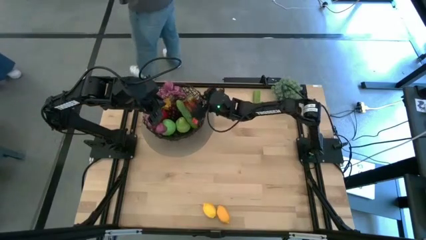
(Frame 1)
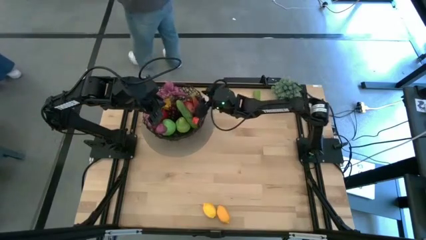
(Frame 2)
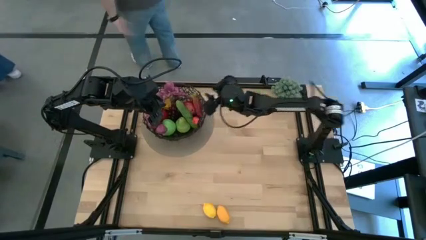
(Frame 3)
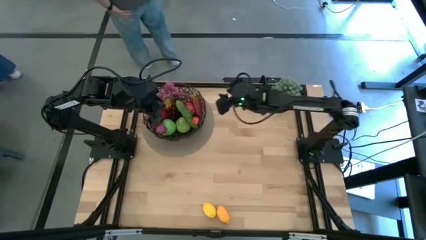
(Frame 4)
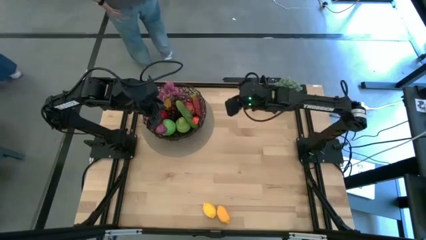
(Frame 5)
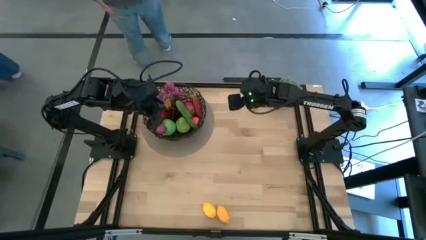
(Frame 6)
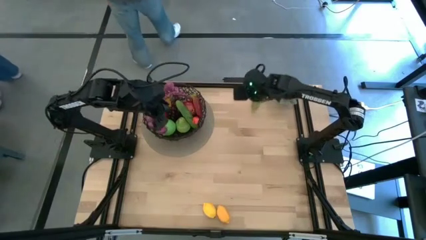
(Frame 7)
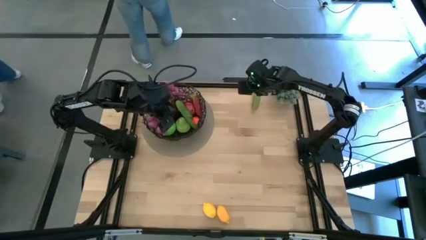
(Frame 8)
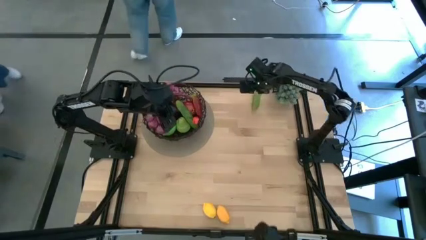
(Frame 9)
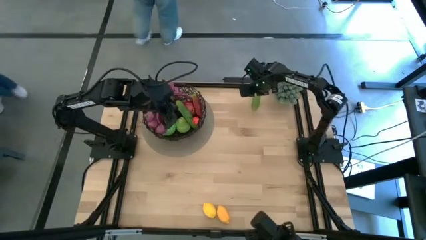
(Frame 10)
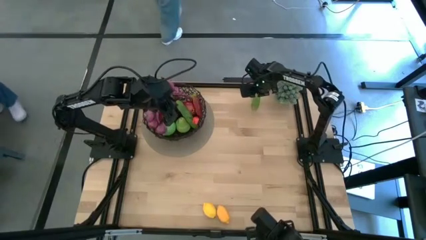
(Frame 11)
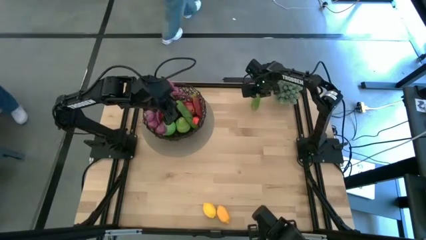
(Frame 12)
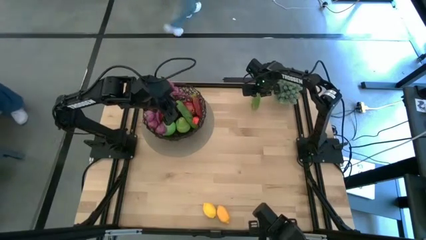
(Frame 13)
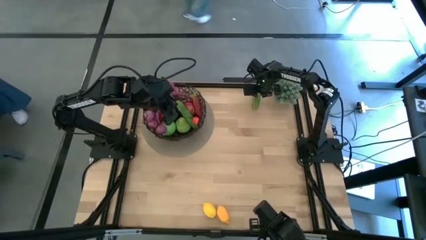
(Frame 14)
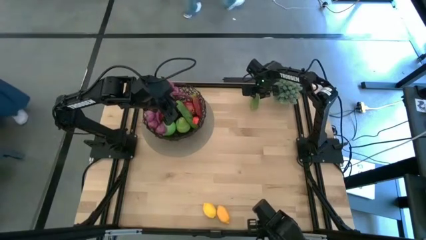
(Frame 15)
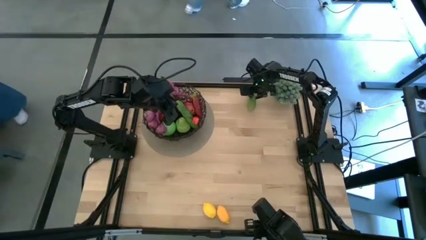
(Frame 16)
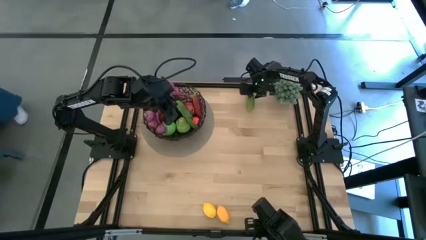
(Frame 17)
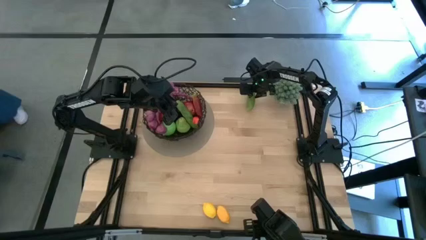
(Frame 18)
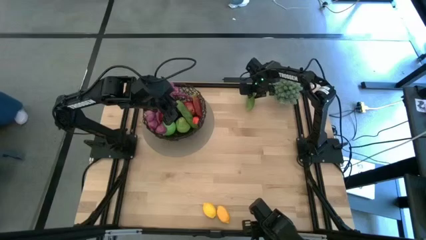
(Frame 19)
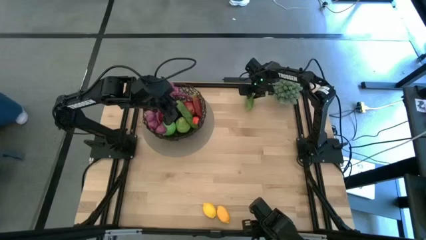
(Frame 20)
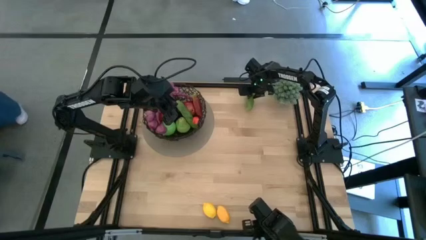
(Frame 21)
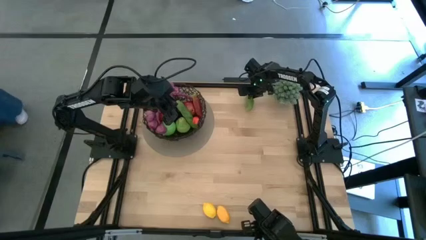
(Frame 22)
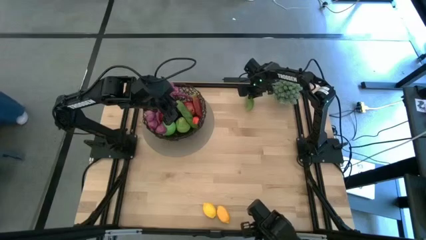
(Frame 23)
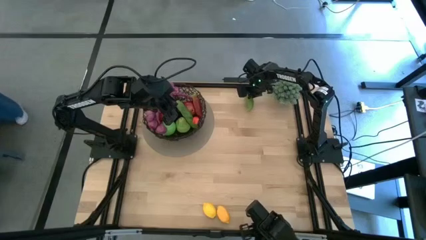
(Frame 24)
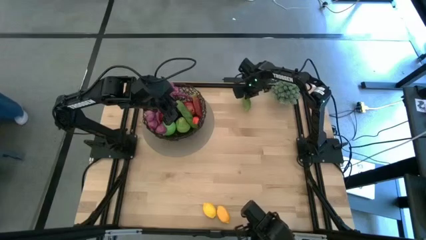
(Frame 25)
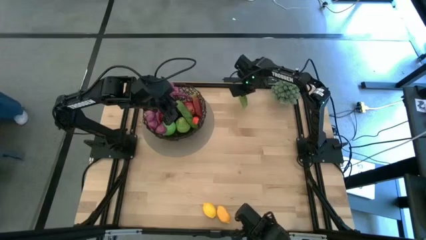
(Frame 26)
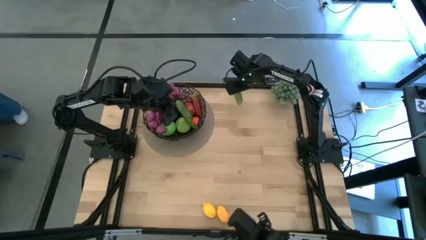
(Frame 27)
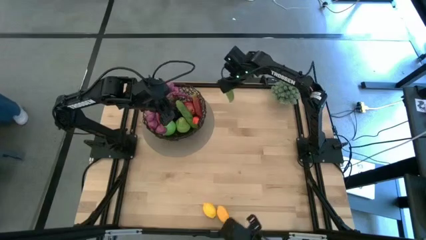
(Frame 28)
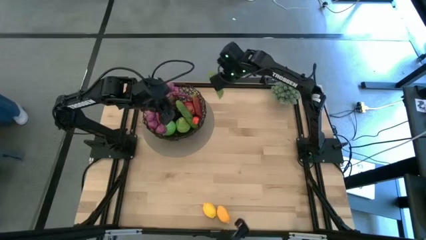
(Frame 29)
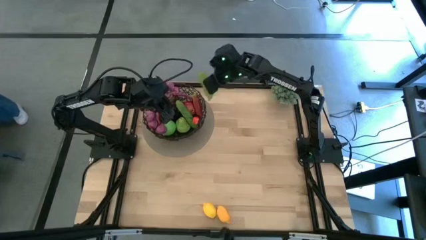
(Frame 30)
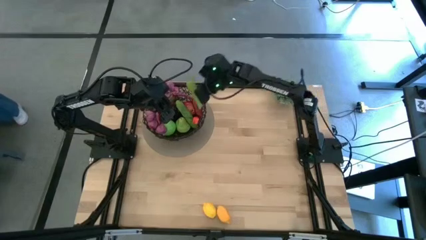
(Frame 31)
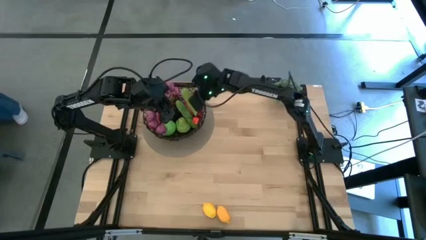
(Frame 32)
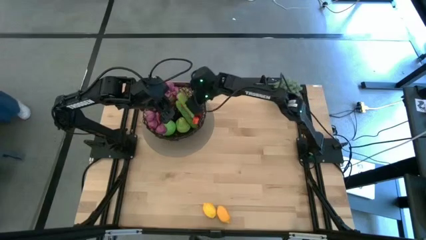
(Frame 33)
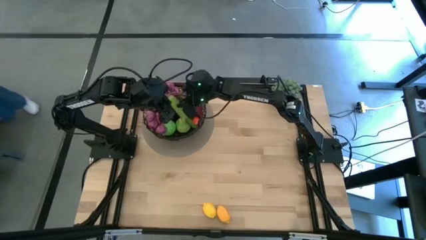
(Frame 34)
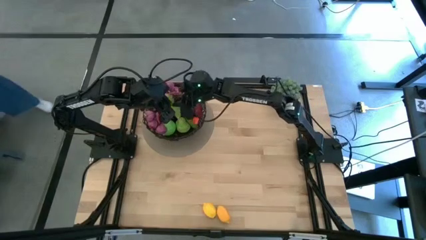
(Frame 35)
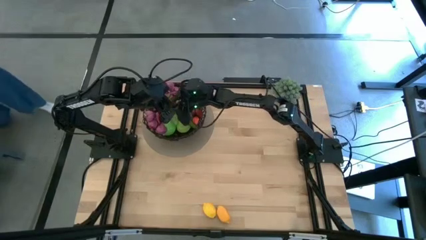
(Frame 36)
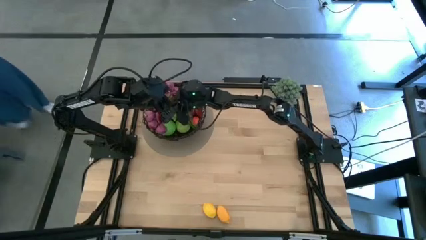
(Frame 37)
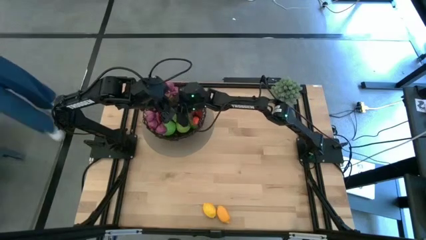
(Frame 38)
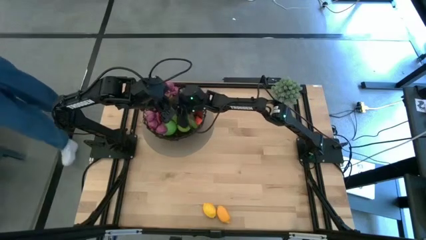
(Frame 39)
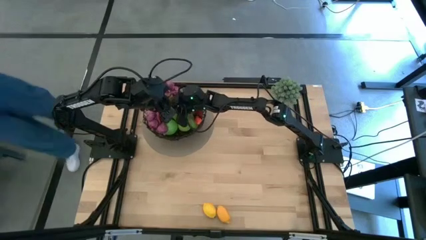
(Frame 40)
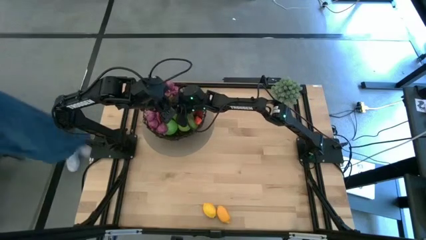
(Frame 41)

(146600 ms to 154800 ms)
Task: Build produce basket
Put the green cucumber into the black wire basket

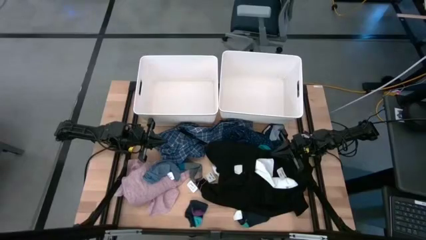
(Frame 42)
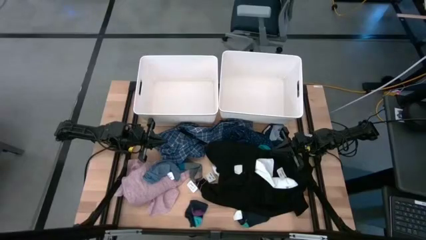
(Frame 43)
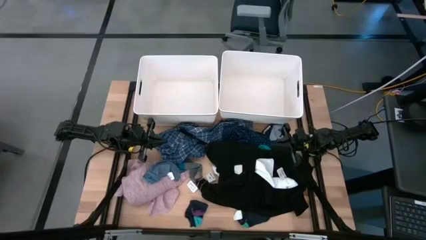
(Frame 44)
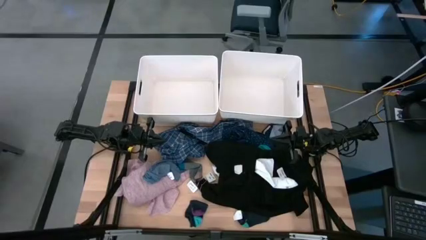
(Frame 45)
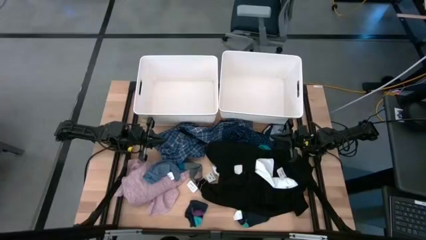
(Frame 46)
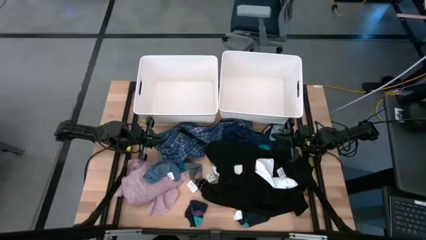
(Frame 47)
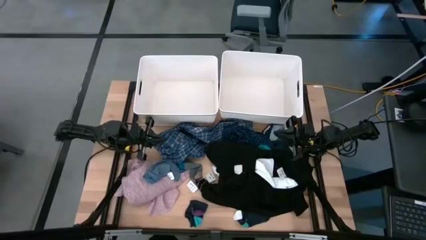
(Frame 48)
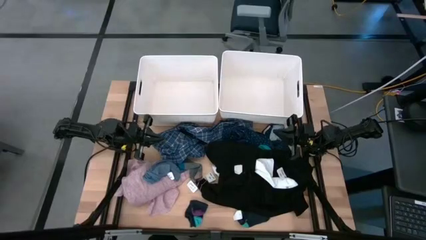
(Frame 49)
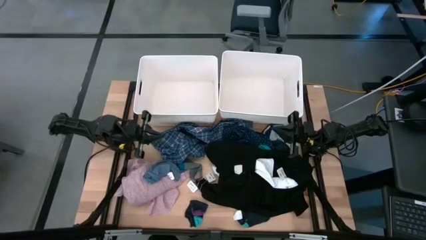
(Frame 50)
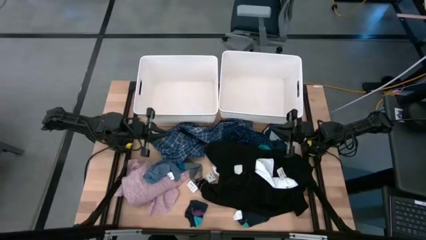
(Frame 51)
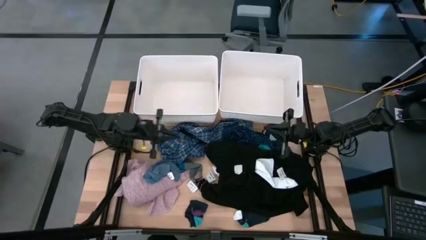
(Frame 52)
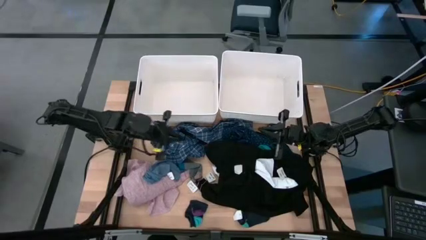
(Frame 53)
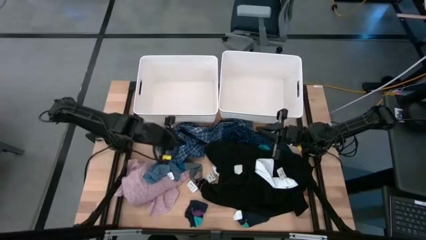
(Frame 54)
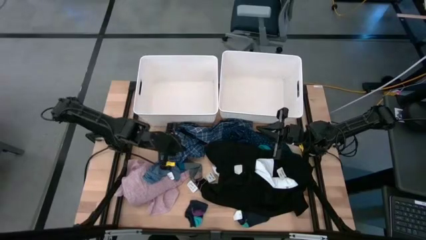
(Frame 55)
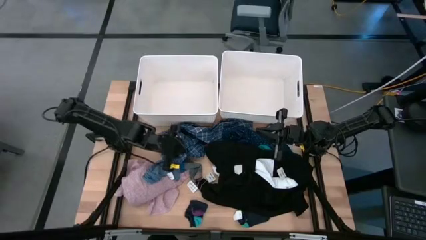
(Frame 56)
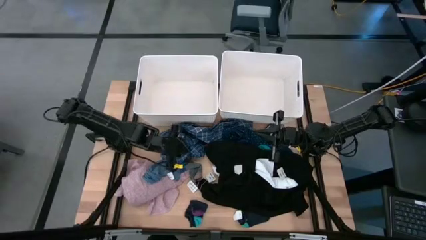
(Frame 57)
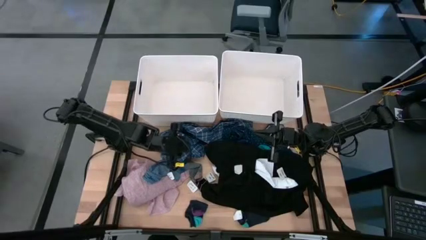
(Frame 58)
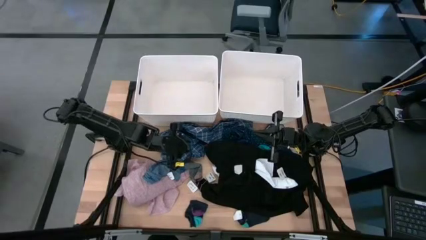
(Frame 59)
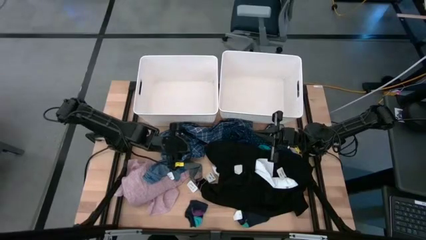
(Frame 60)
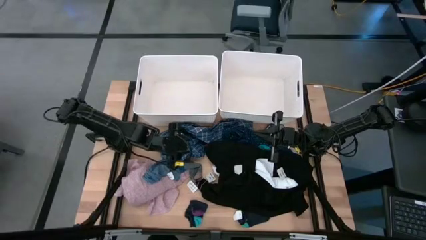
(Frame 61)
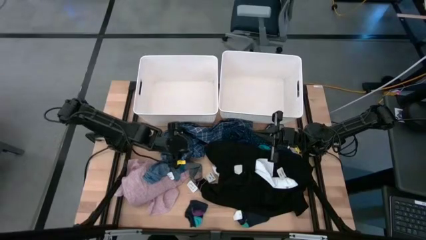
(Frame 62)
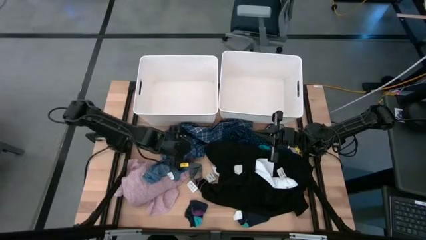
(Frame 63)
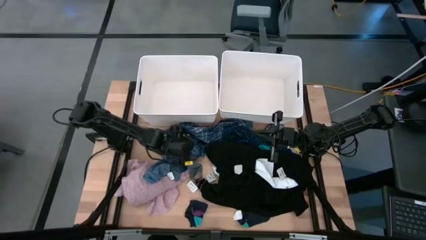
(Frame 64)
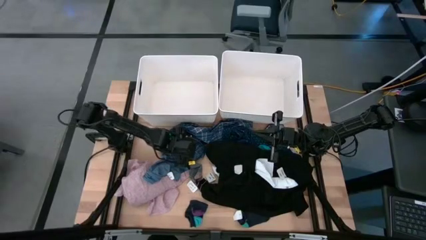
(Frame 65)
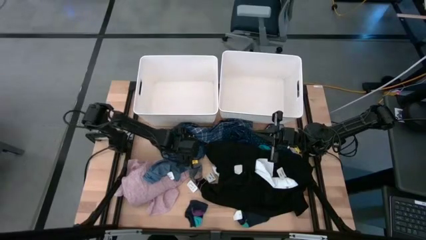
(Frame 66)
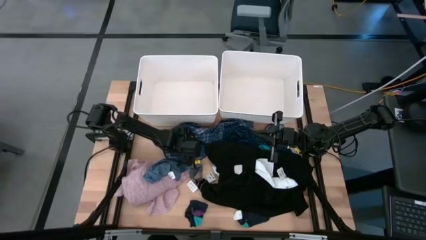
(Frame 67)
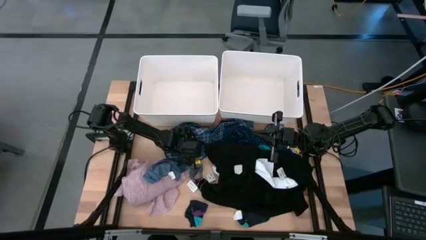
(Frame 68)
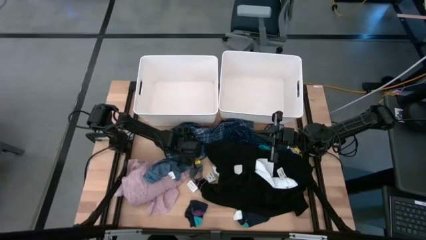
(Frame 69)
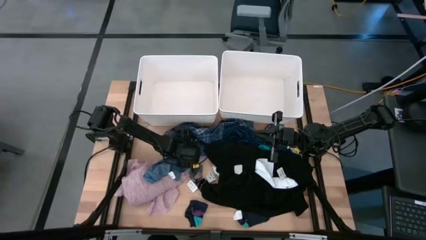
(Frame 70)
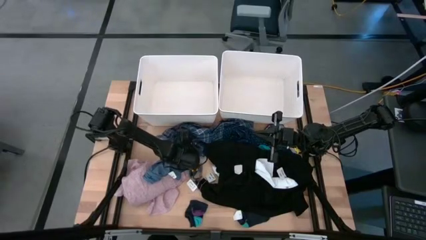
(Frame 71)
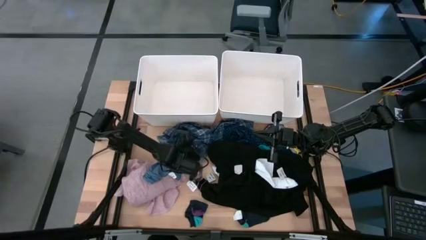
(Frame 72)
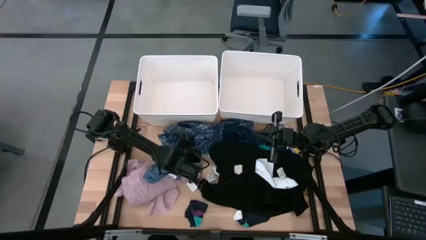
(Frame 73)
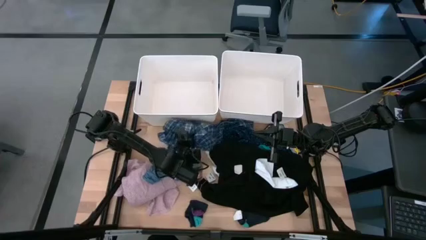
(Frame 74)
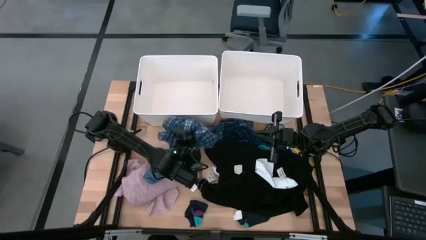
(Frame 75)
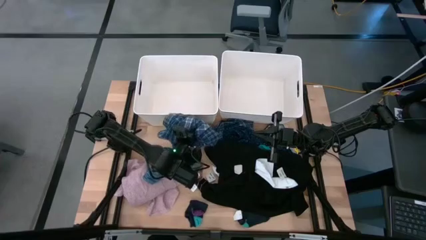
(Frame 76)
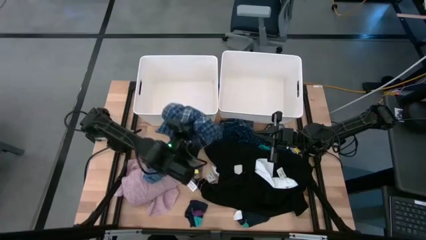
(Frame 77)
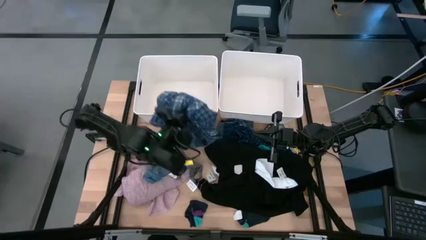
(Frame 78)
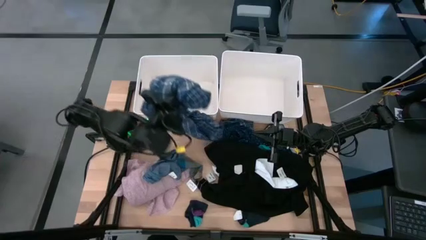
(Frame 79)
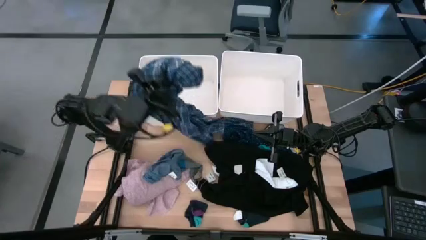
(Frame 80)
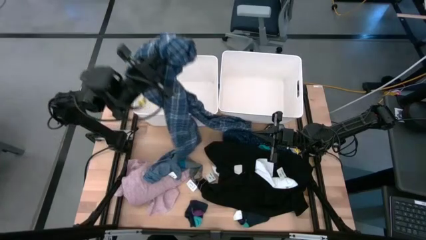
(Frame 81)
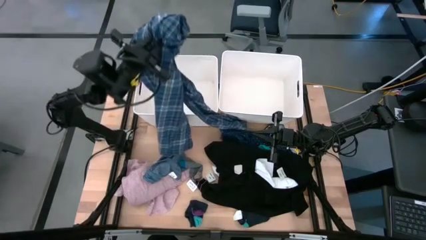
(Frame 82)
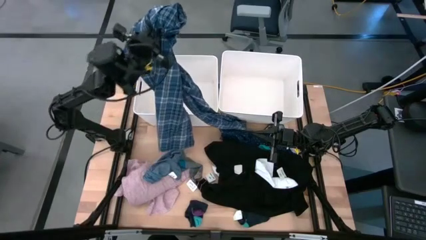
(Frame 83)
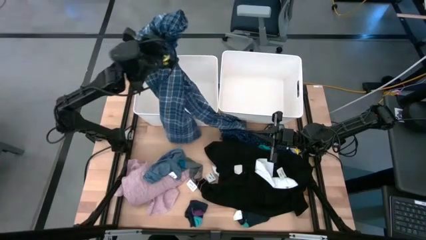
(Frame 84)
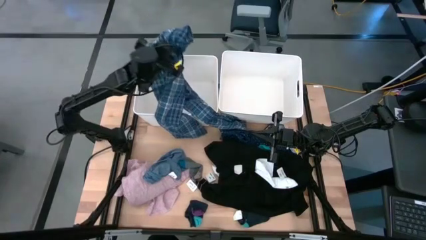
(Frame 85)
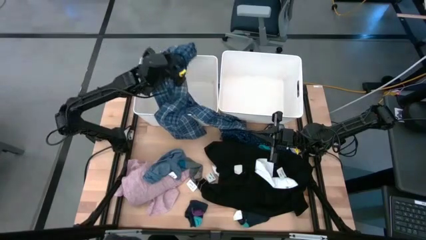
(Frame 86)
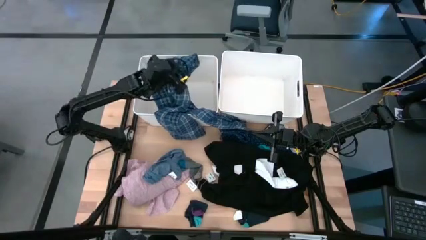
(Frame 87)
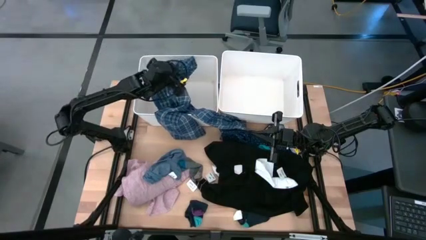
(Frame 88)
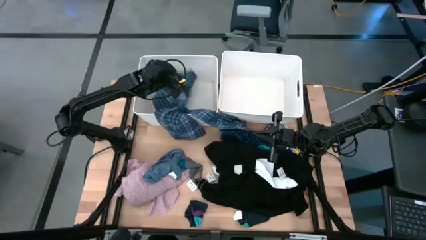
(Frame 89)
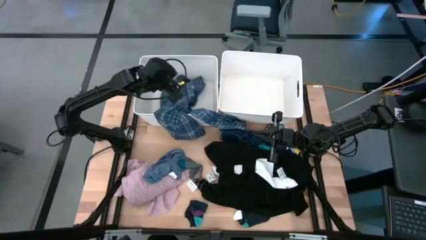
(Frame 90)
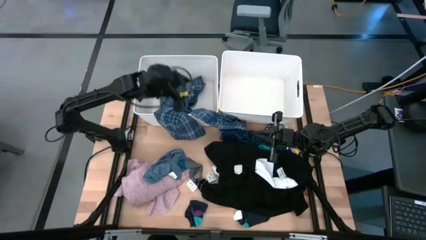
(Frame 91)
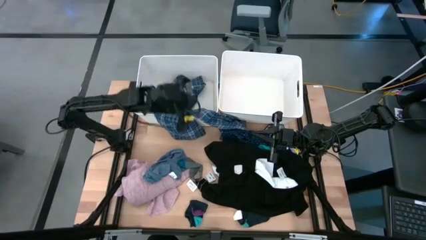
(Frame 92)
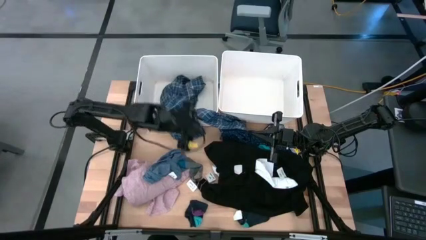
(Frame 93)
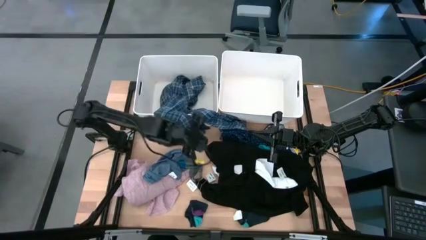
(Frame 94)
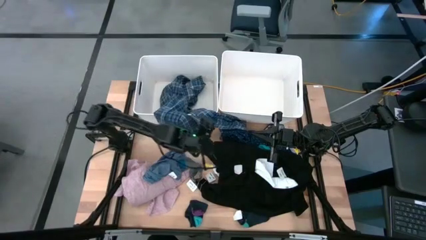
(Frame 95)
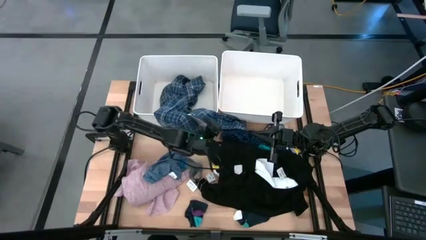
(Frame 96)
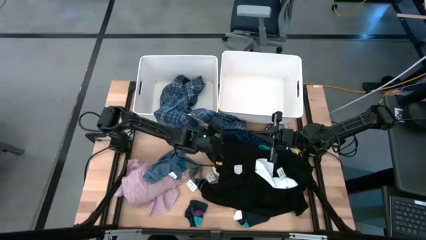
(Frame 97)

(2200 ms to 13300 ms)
Task: Sort clothes
Put the patterned shirt into the left white bin
